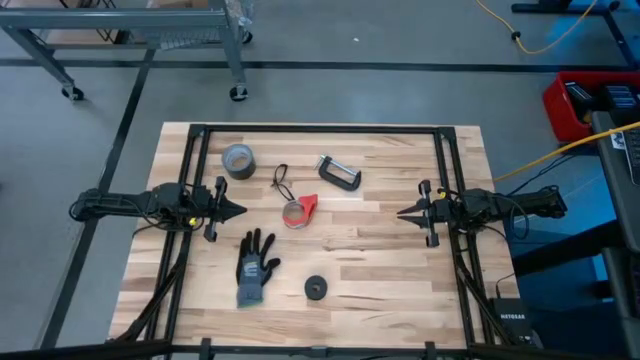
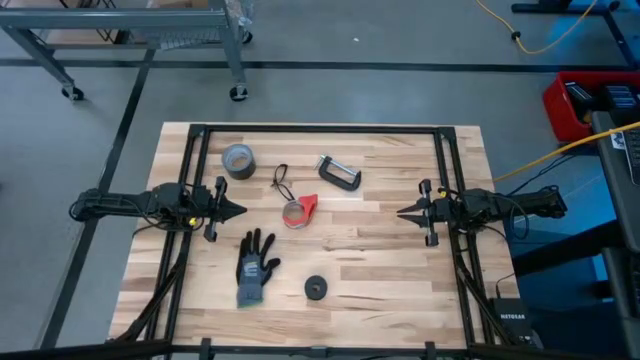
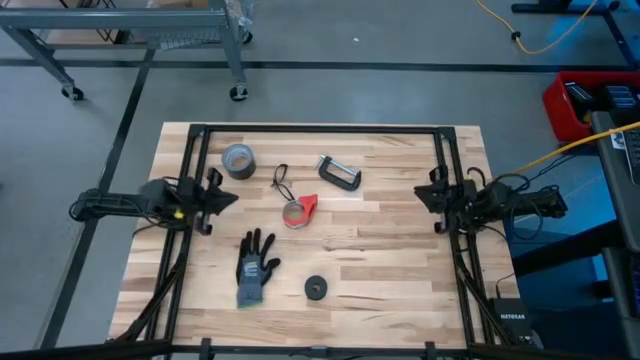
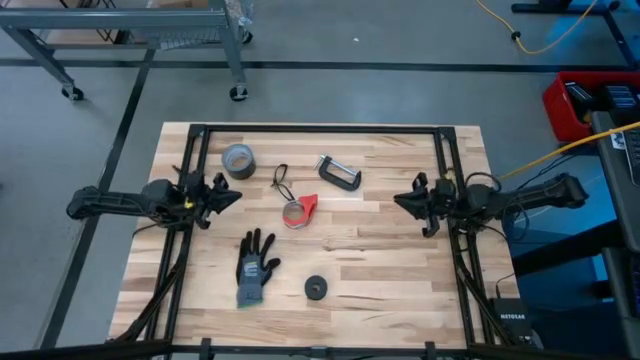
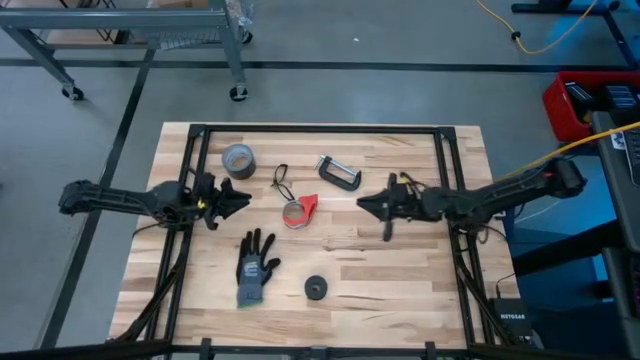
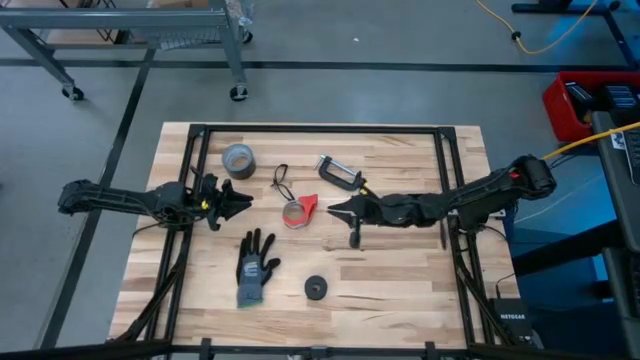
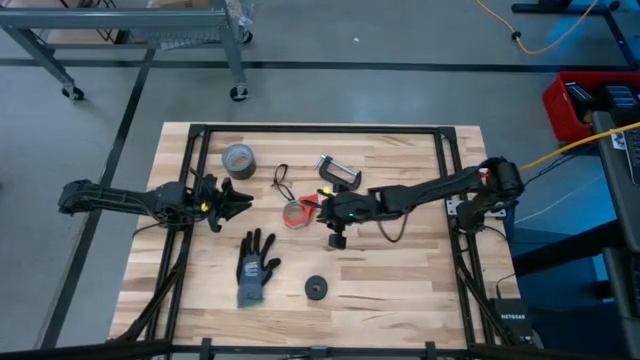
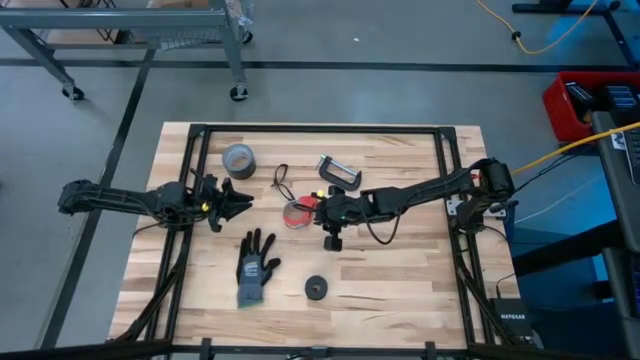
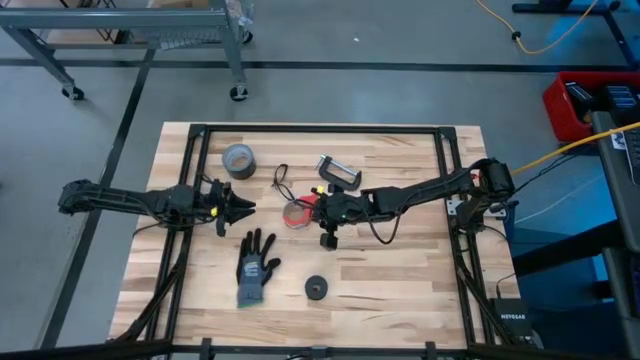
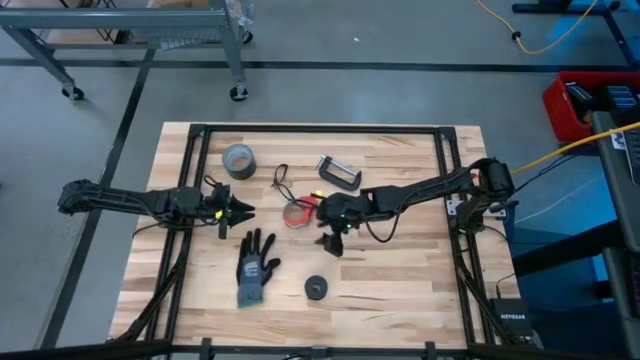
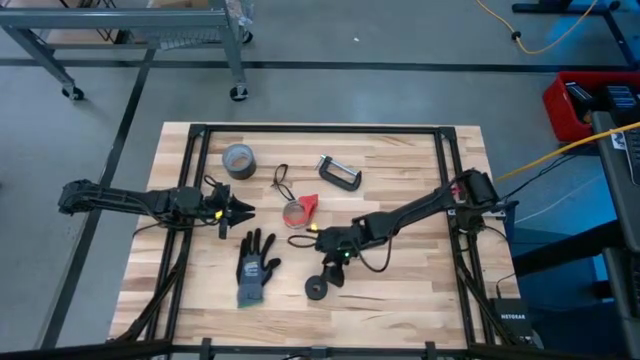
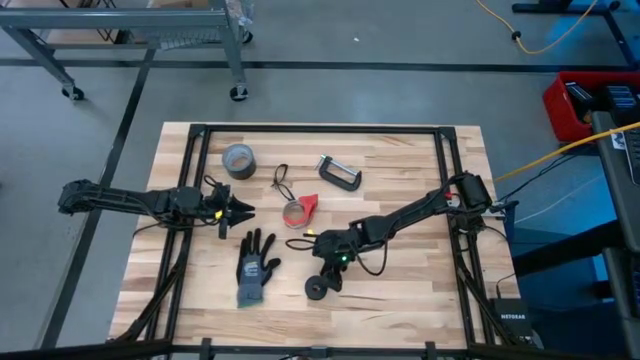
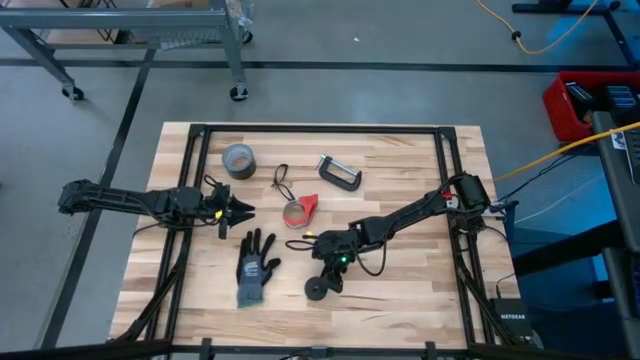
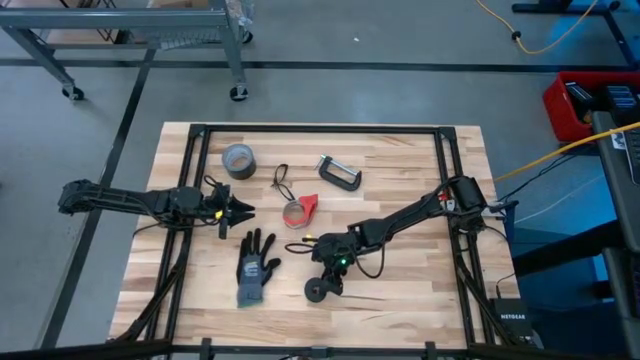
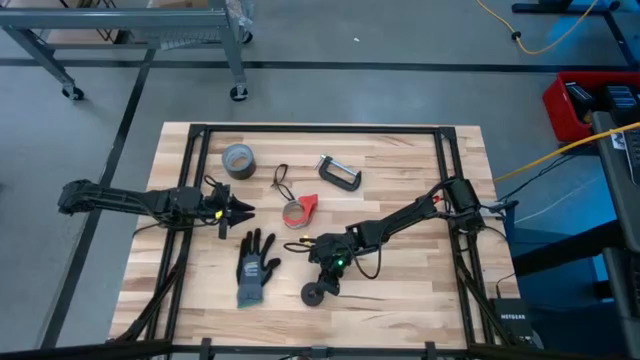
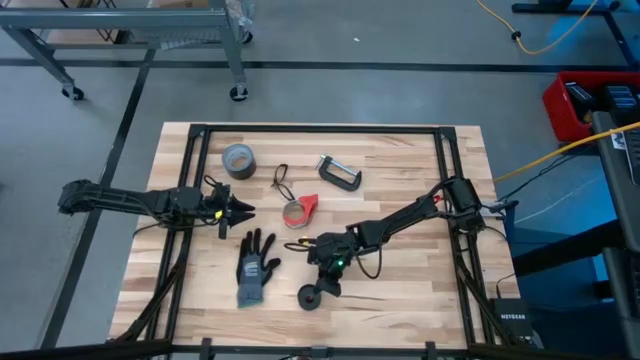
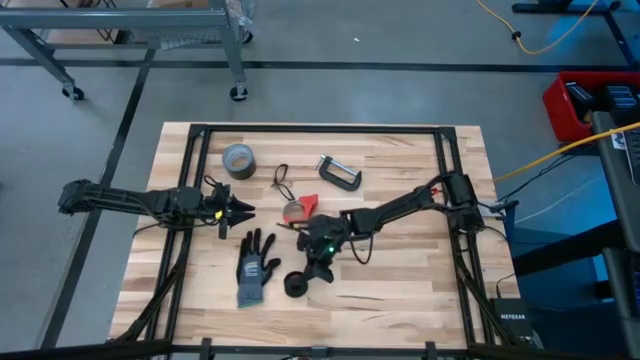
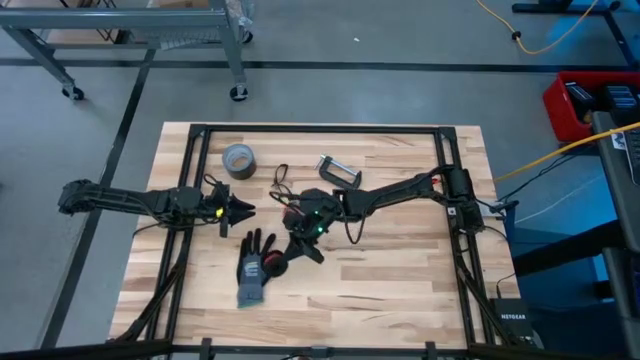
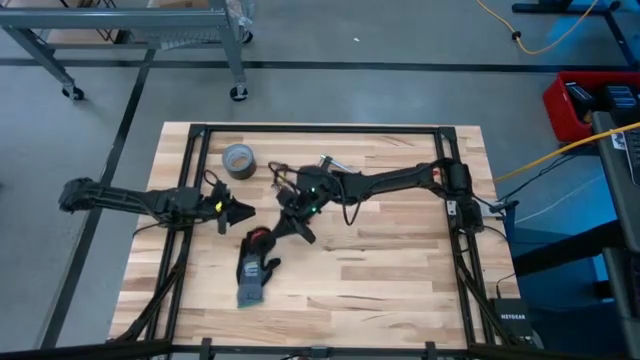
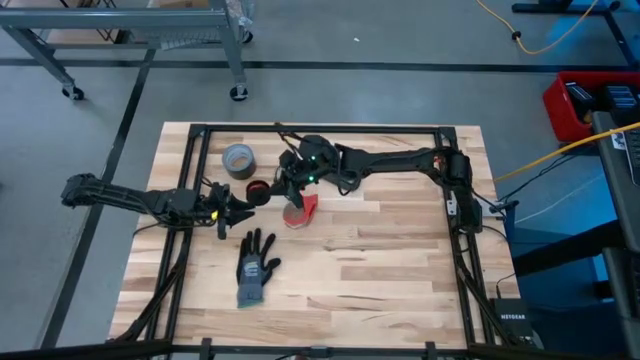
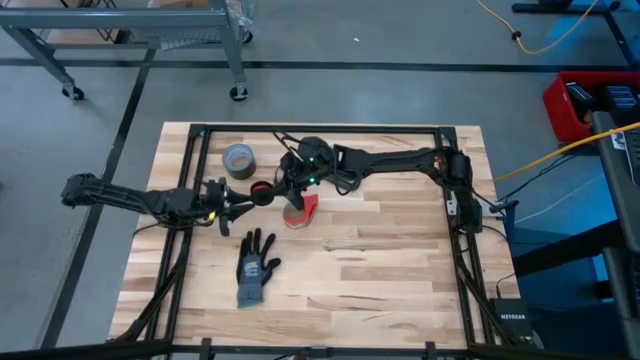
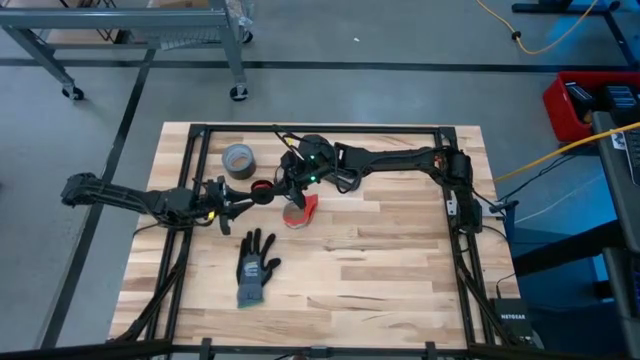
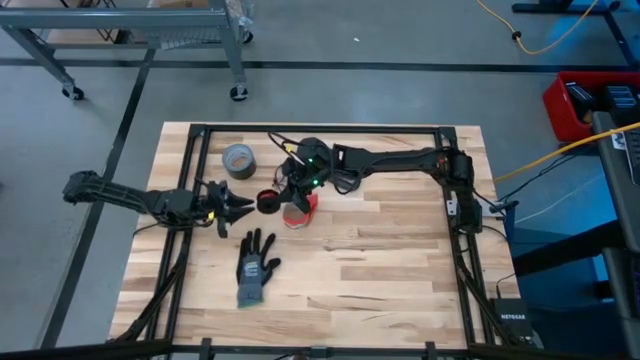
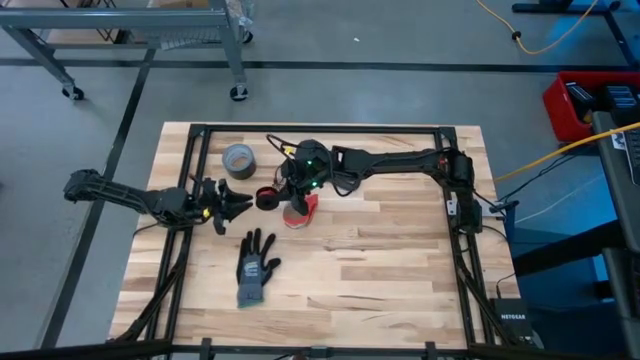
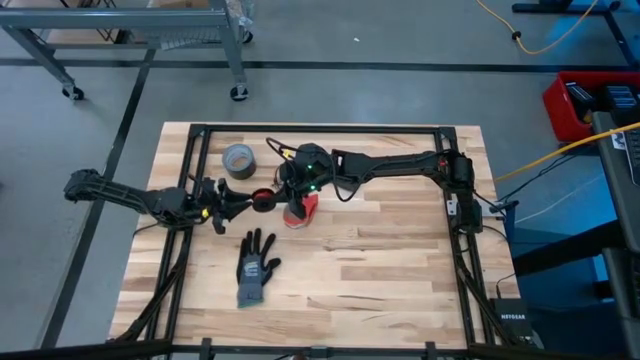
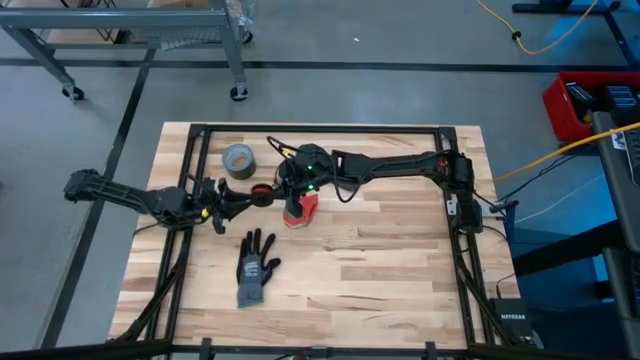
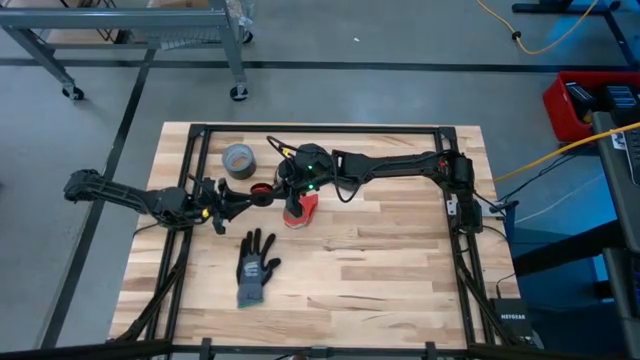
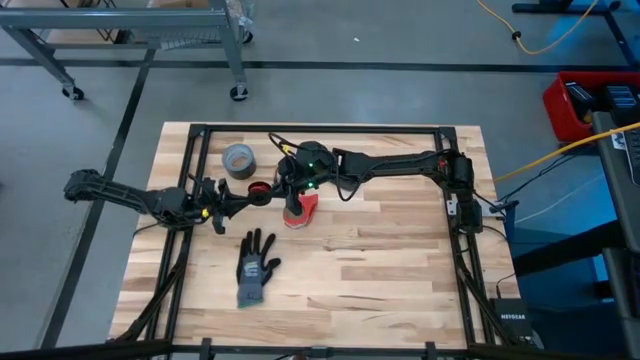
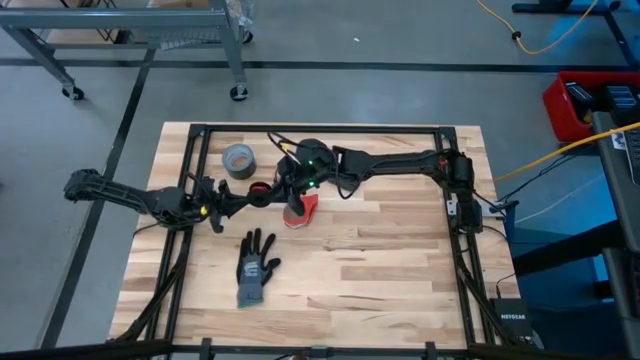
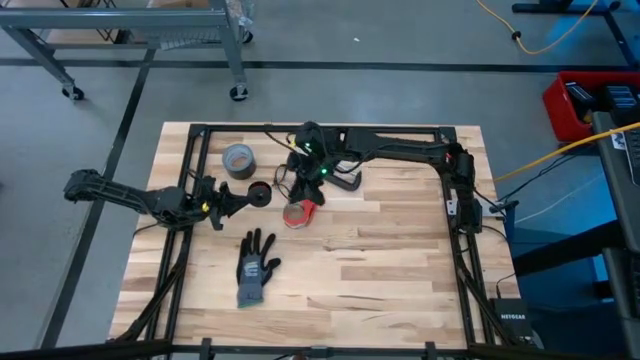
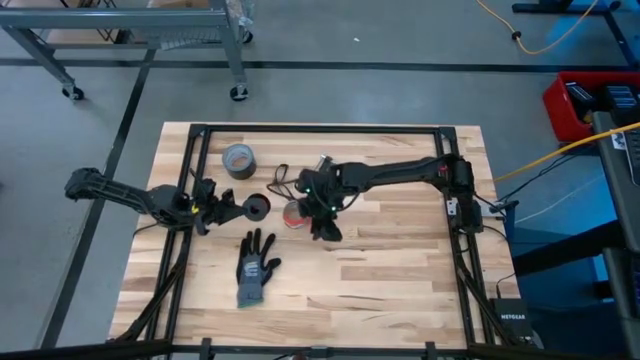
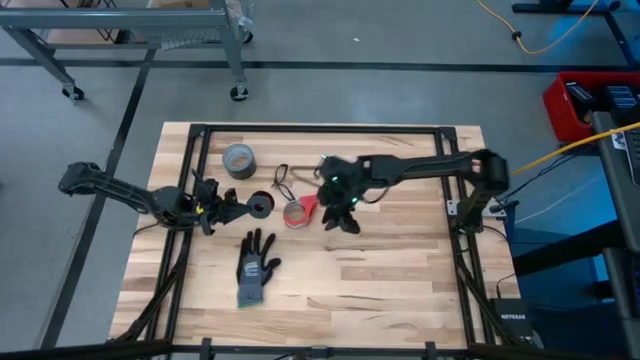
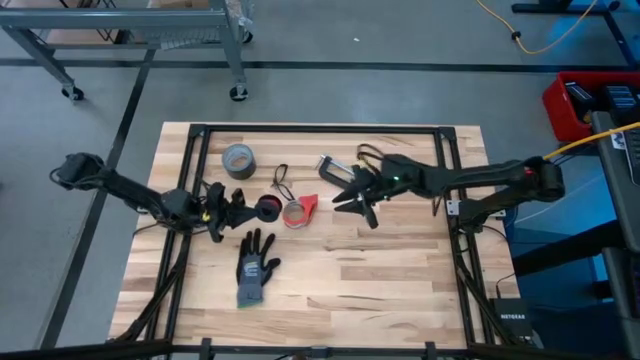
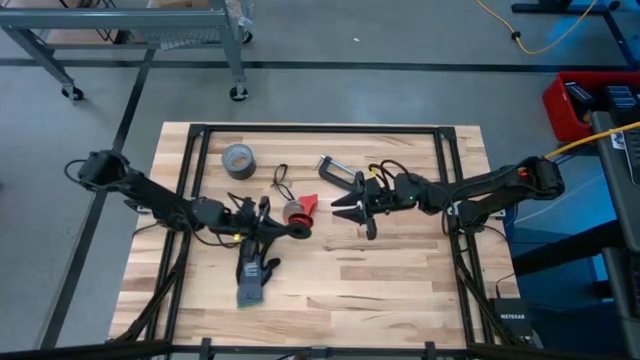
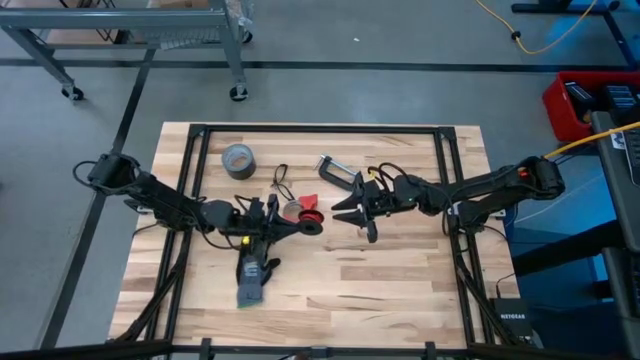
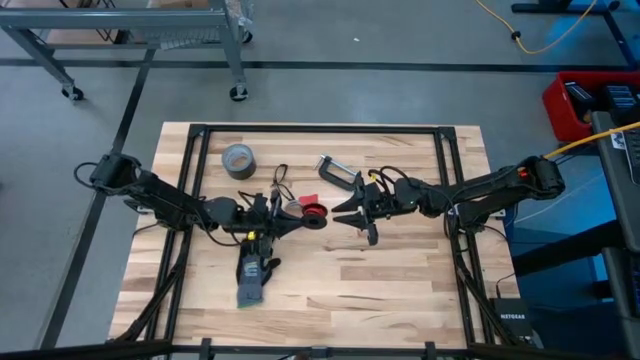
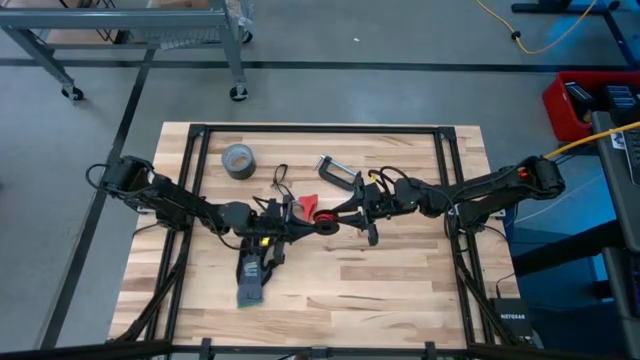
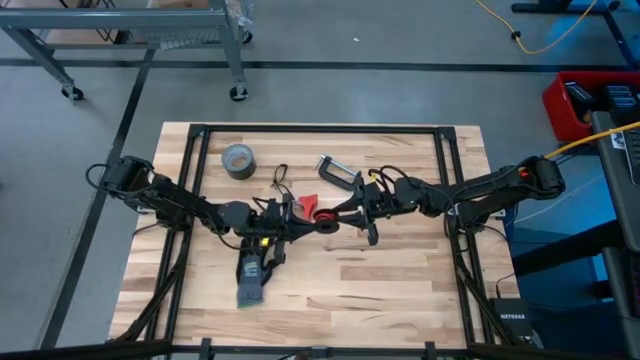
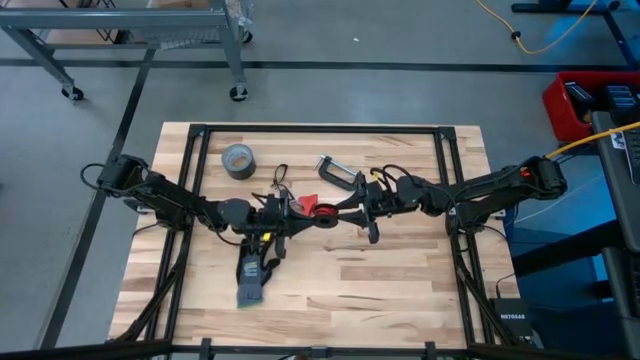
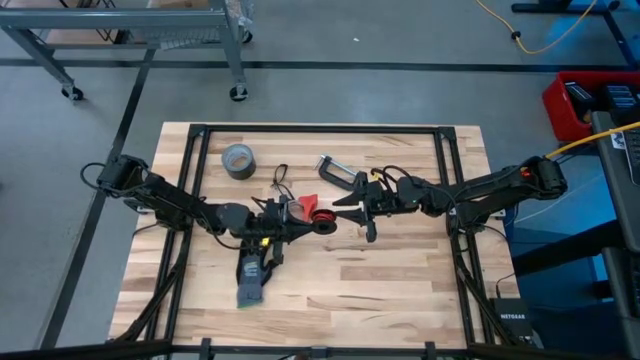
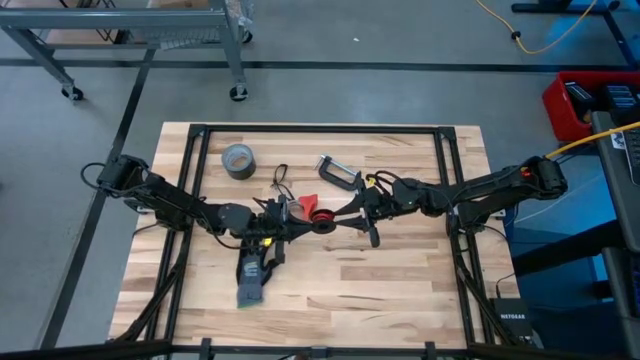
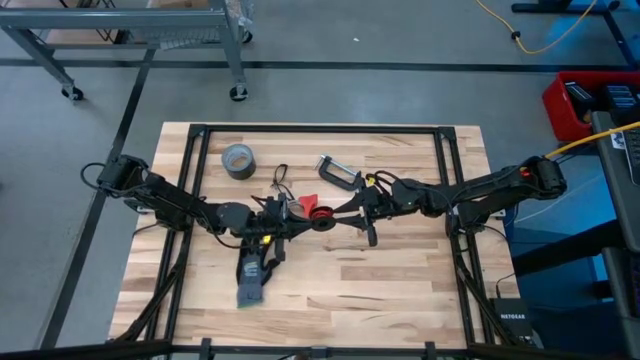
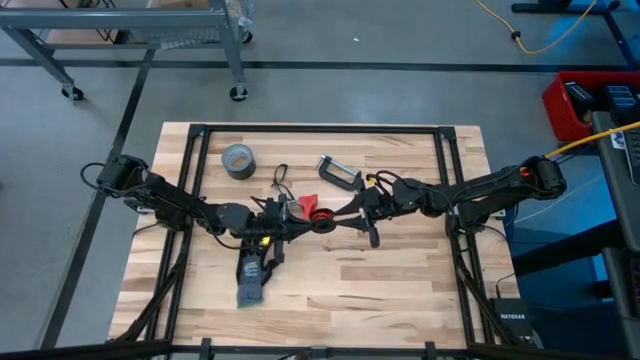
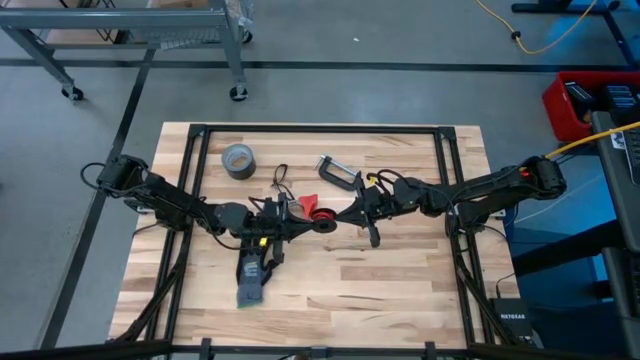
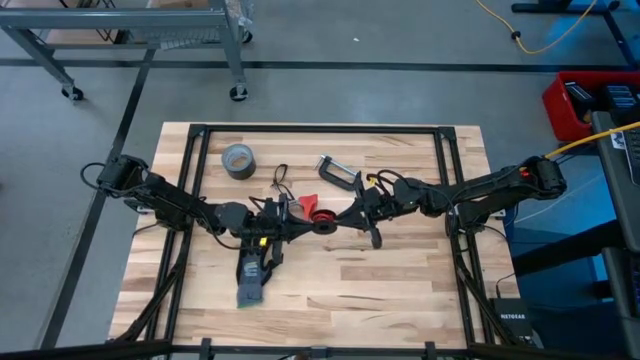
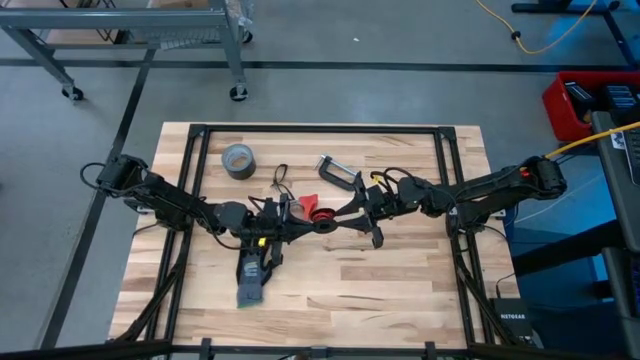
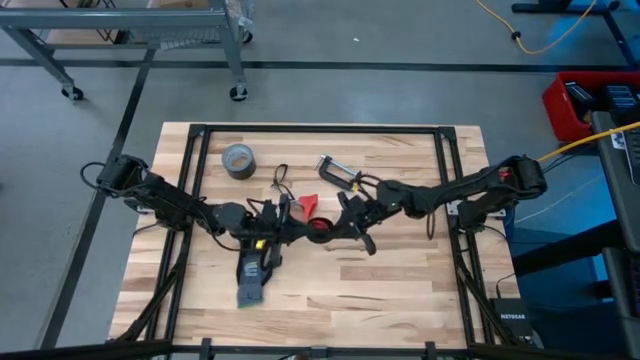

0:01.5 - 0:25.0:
Task: Coil cords
Uncoil the red wire from the spool
